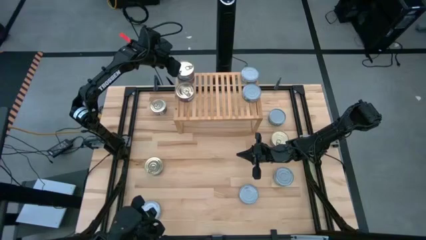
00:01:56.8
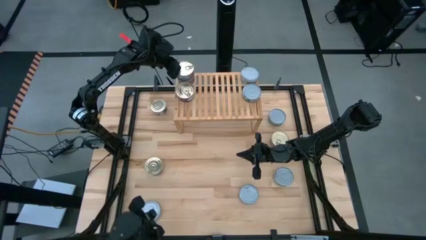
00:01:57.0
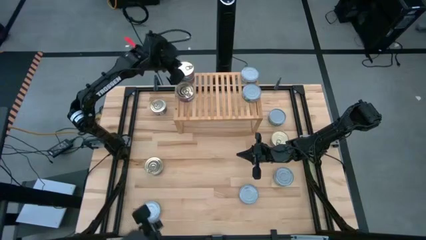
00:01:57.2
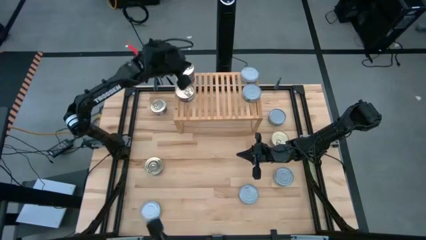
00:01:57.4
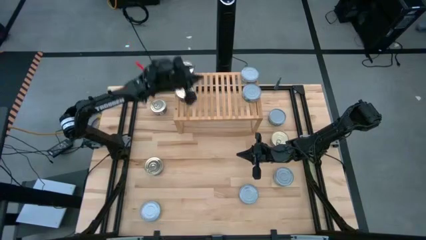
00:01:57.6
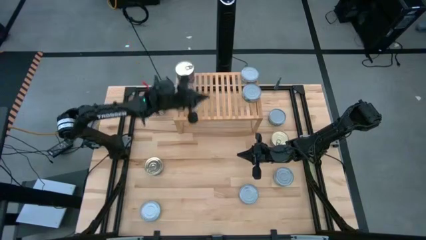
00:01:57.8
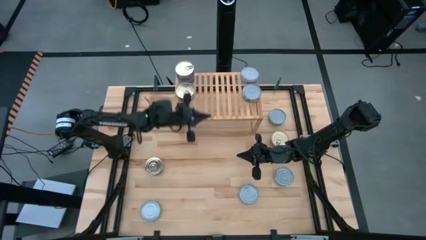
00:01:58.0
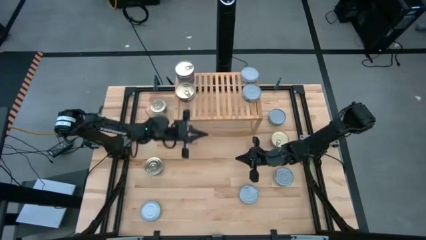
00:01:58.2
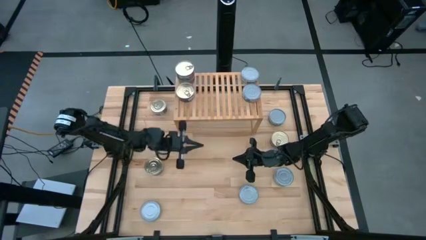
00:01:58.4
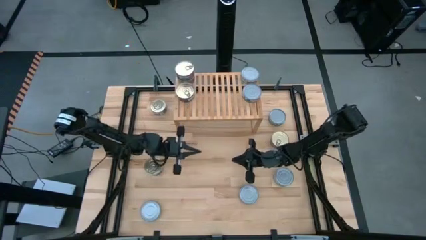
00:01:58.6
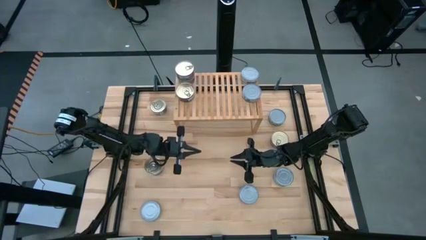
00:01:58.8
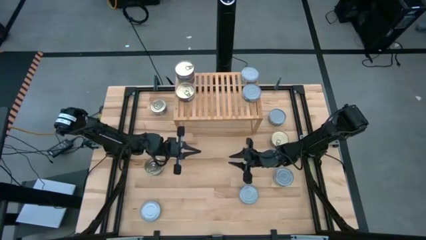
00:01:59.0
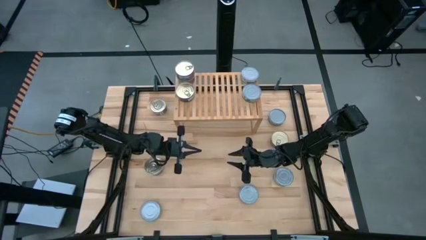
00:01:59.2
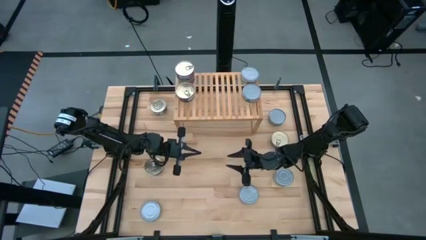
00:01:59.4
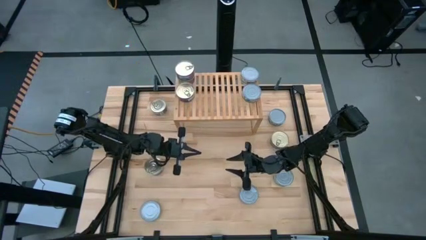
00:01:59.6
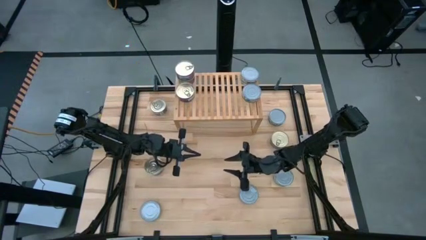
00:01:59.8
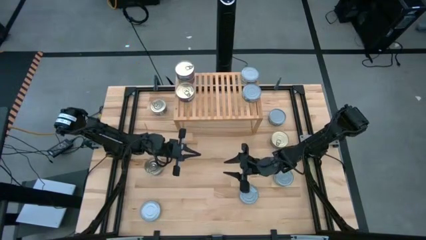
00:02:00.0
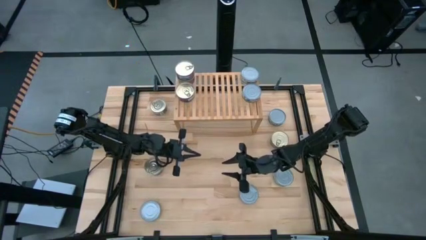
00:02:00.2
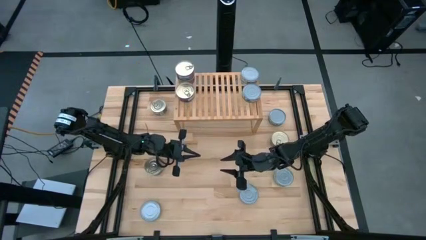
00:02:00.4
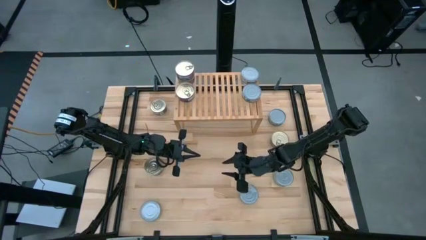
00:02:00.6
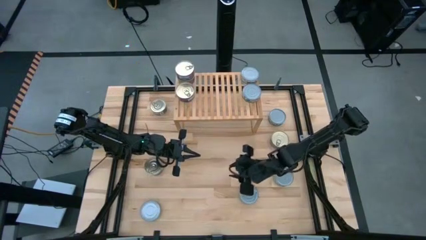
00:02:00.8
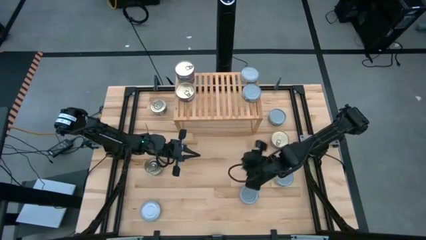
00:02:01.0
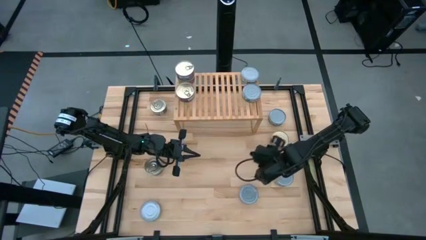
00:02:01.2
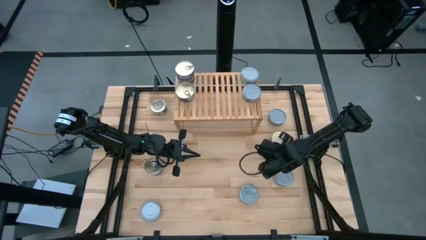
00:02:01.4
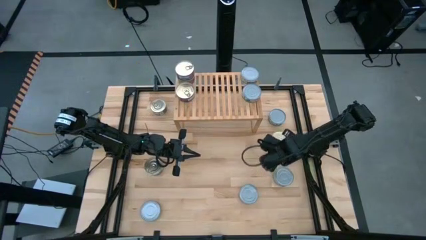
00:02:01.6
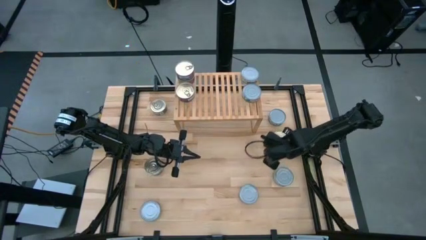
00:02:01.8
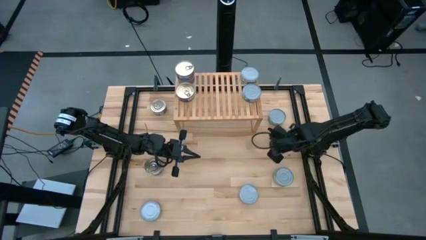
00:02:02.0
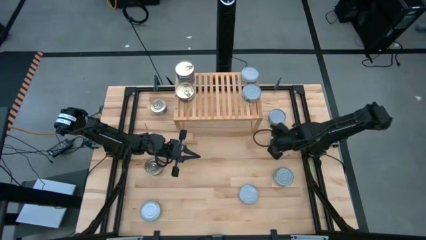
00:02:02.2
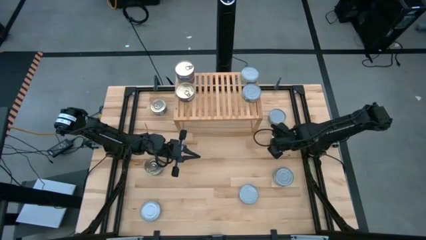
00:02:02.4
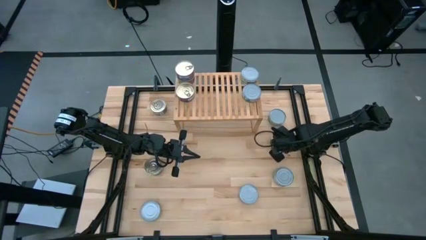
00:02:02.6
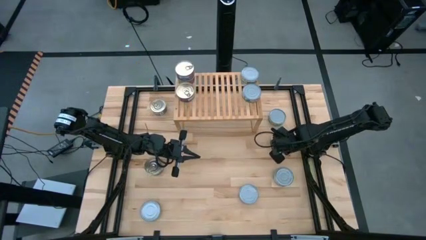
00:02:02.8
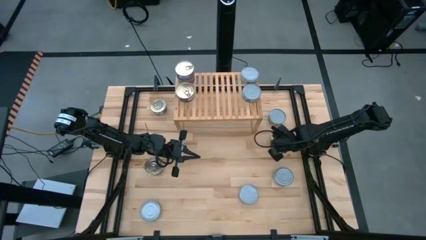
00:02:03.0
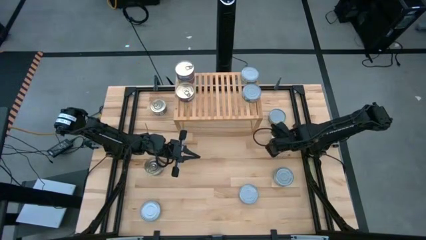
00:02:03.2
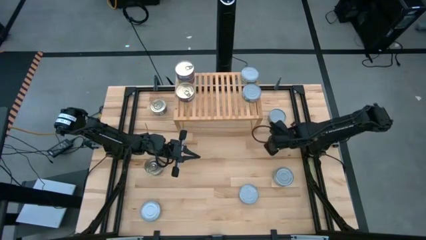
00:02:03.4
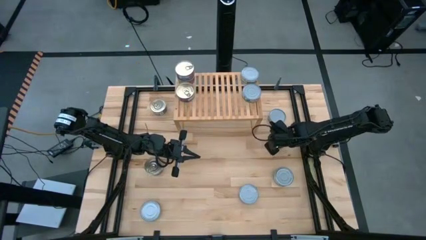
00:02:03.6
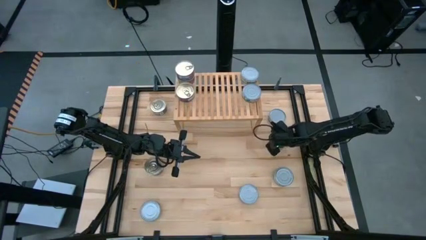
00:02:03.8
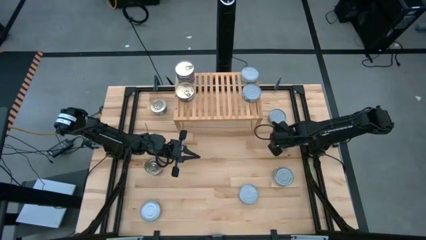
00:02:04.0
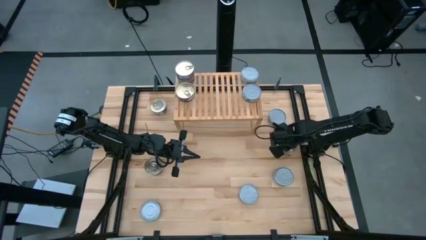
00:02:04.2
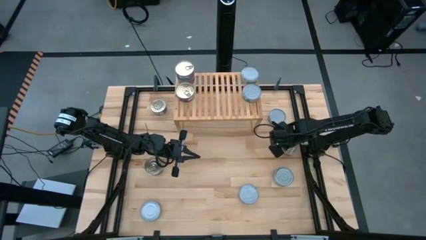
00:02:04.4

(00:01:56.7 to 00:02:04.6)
Task: Stack canned seafood by type on shelf
Adjust the blue-pink tuna can

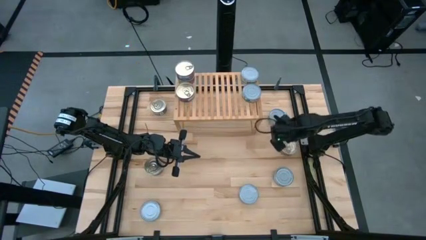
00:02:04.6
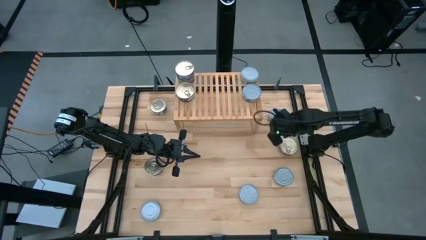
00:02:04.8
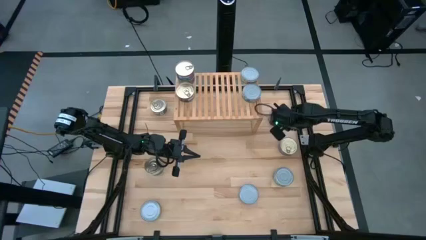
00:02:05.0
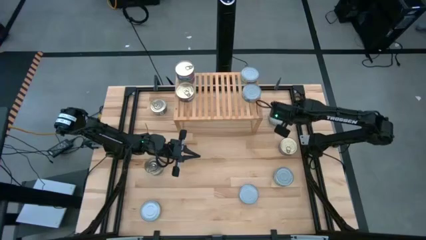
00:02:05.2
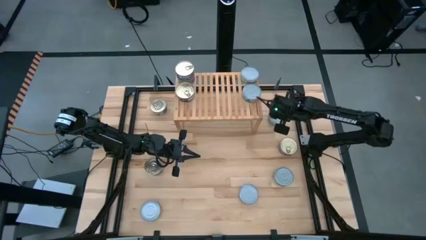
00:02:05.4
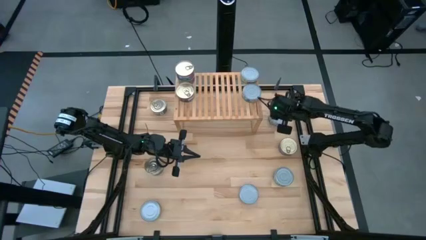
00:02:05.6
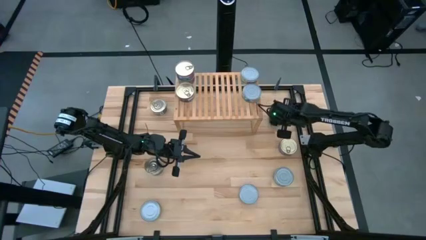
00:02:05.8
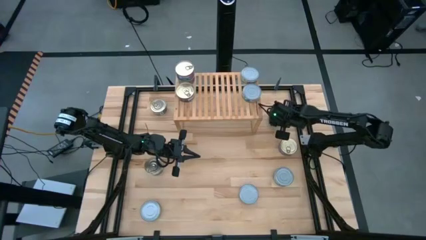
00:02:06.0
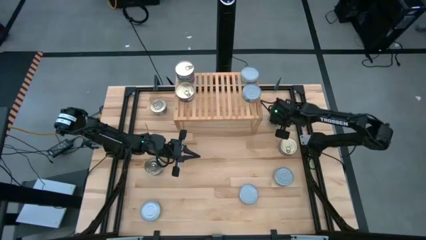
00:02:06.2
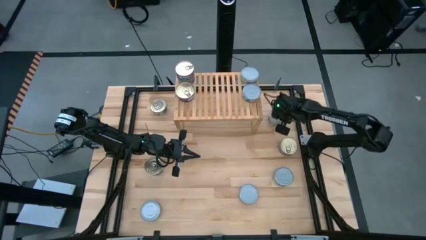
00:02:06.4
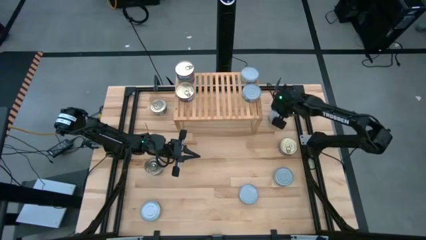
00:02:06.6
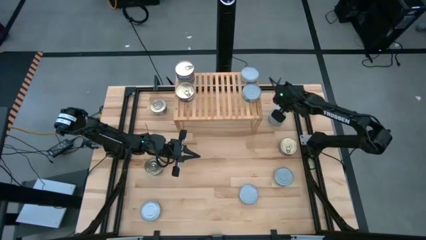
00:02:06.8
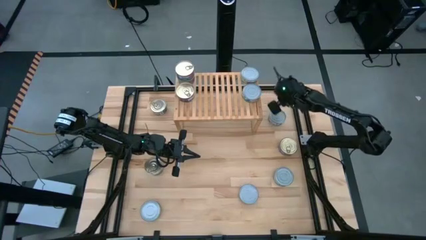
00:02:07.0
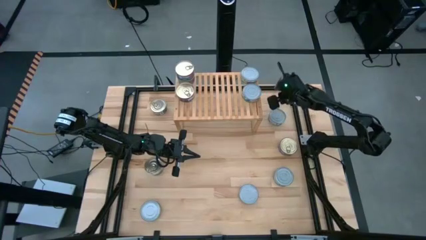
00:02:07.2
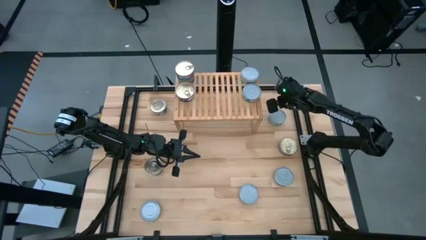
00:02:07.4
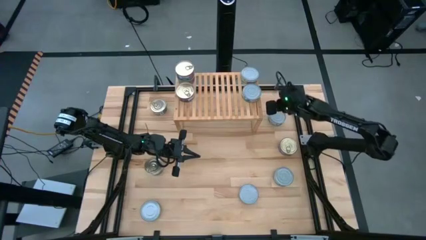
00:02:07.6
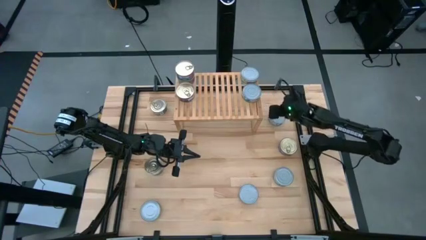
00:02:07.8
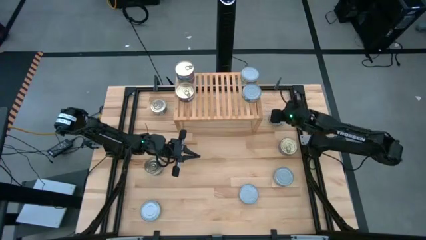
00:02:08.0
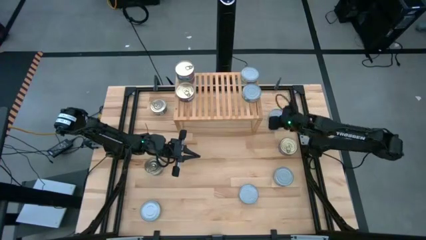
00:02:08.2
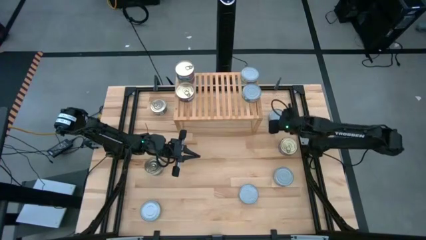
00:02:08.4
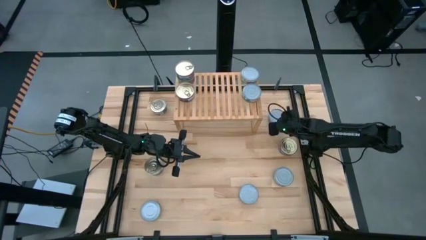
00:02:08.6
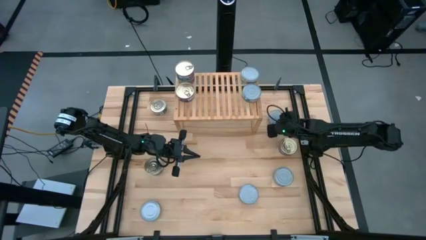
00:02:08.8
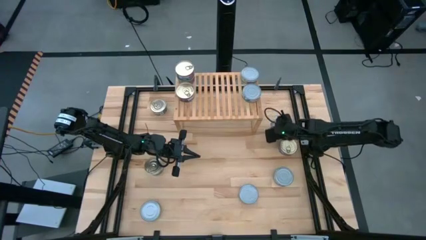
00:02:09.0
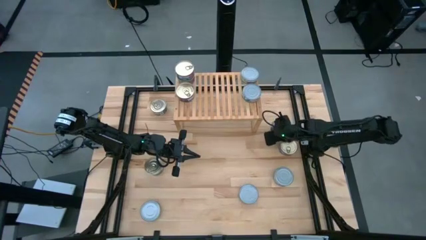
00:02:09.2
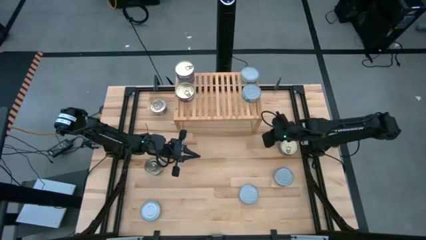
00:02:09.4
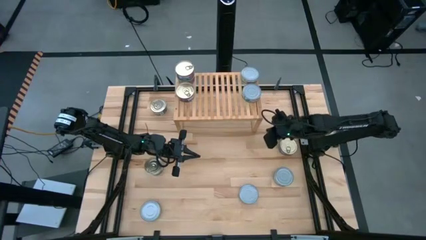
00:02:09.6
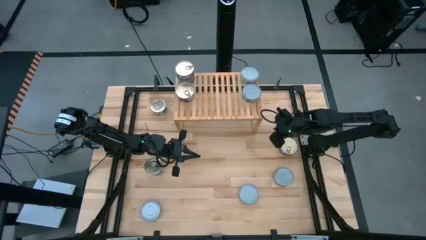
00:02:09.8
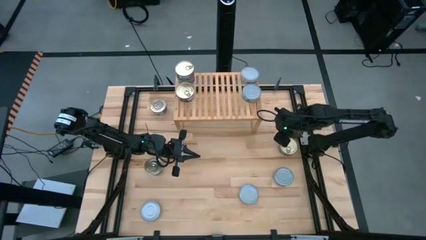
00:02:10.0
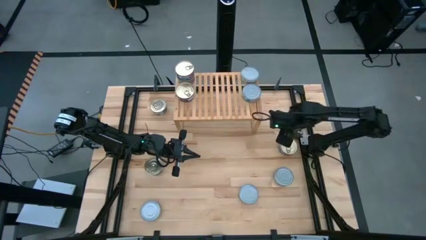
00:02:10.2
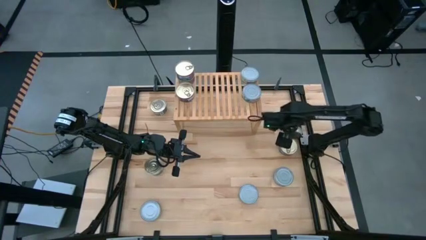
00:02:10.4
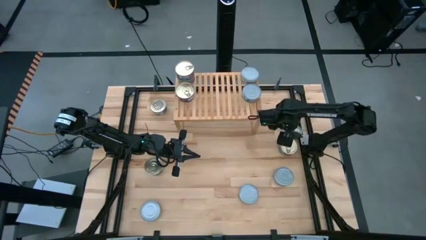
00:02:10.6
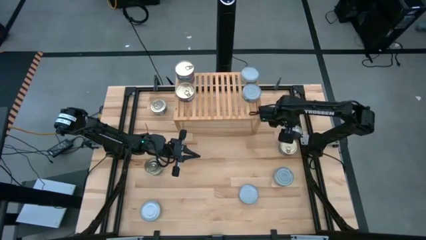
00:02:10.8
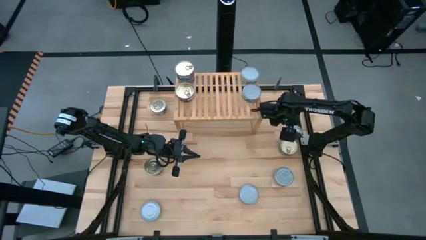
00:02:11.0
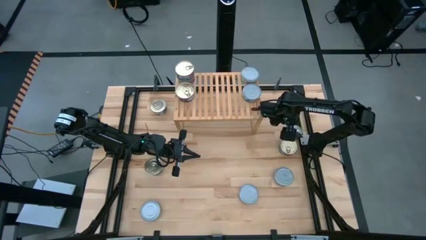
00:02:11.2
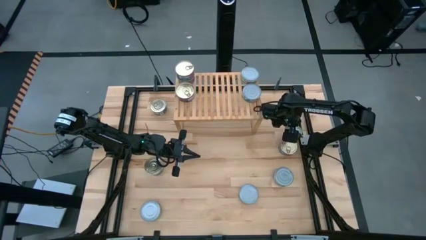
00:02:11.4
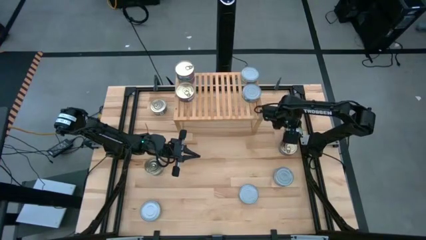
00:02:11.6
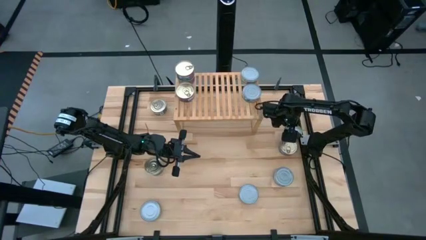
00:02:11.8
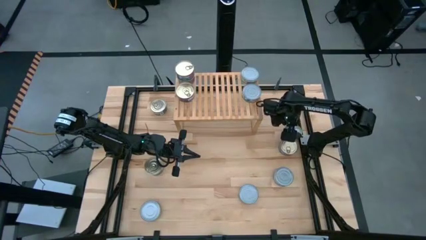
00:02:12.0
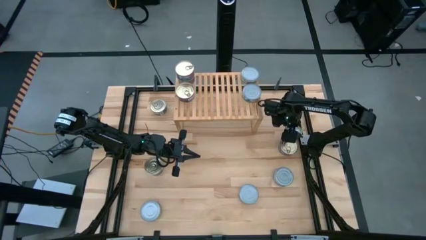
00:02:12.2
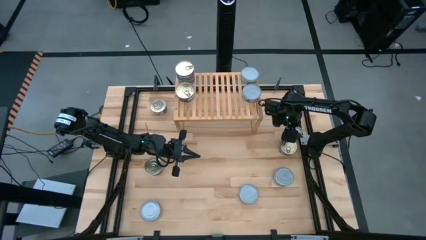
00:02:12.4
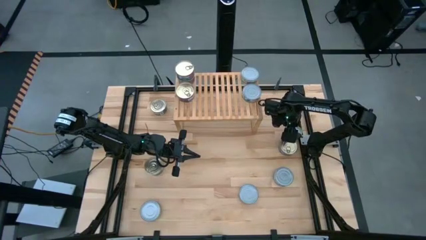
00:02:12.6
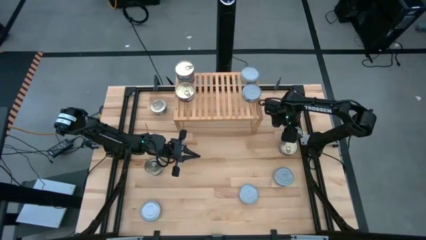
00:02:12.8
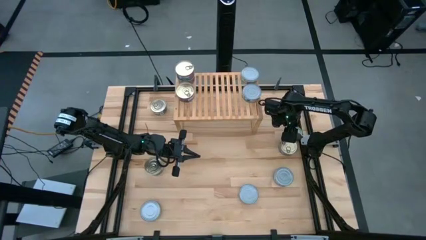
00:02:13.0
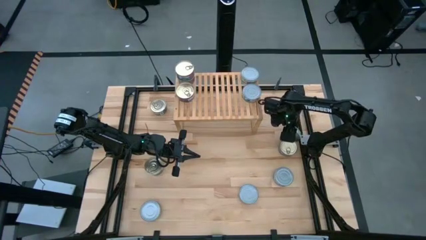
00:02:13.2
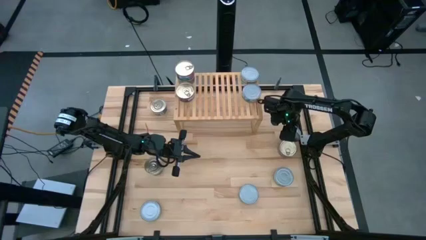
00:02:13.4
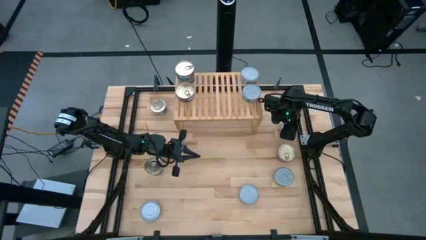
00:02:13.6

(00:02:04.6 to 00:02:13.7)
Stack the green tuna can on top of the other green tuna can on the shelf
